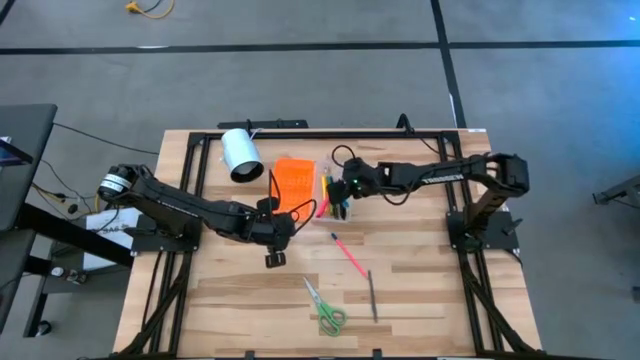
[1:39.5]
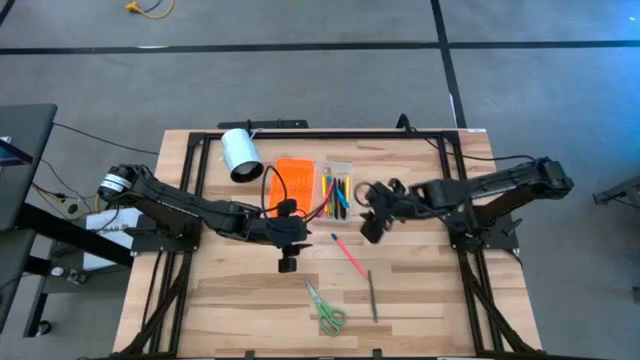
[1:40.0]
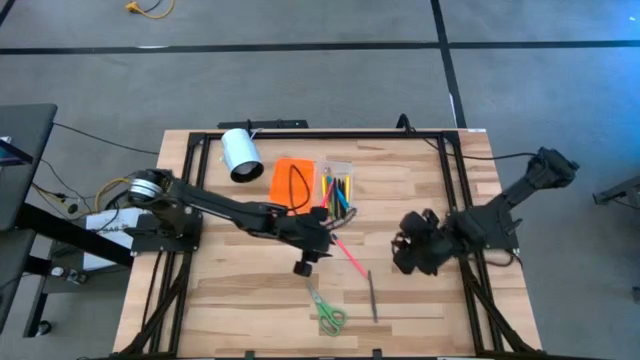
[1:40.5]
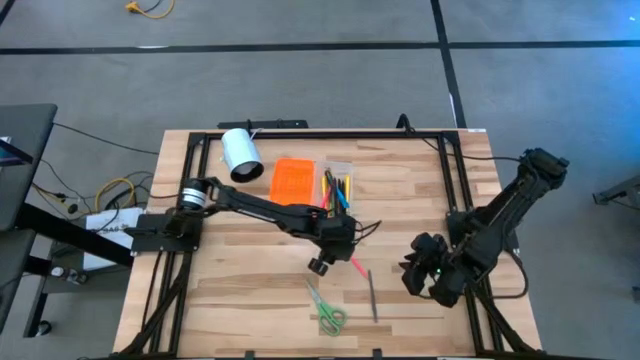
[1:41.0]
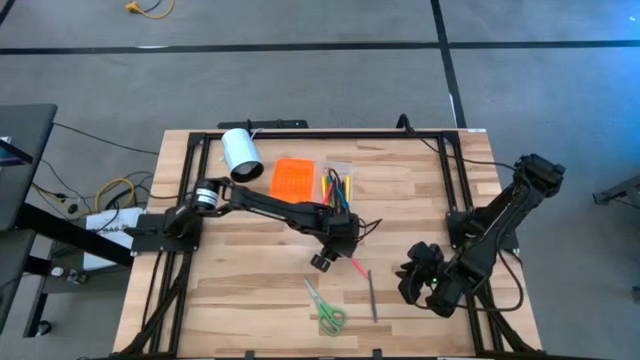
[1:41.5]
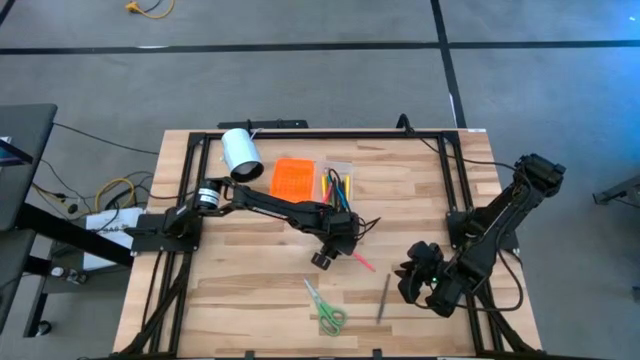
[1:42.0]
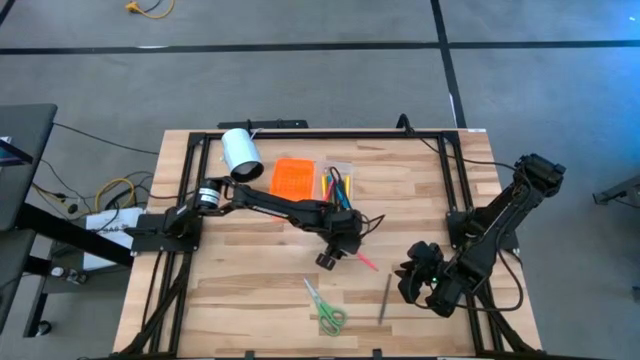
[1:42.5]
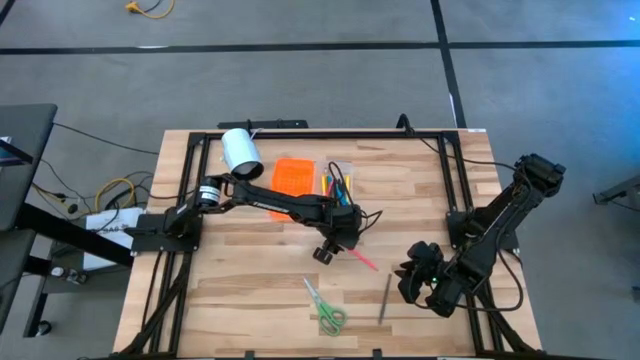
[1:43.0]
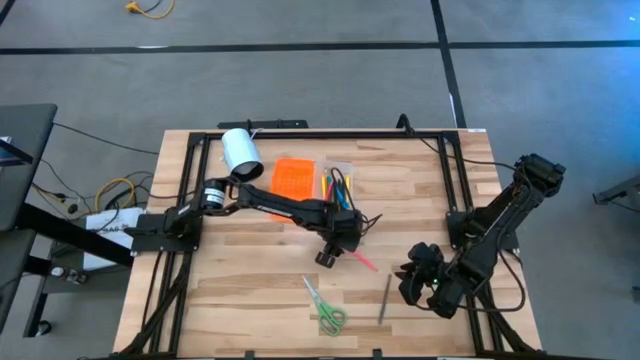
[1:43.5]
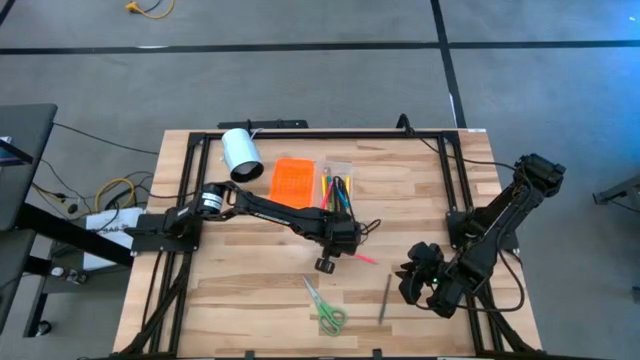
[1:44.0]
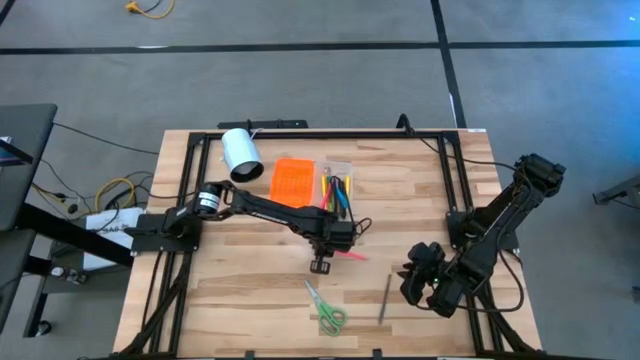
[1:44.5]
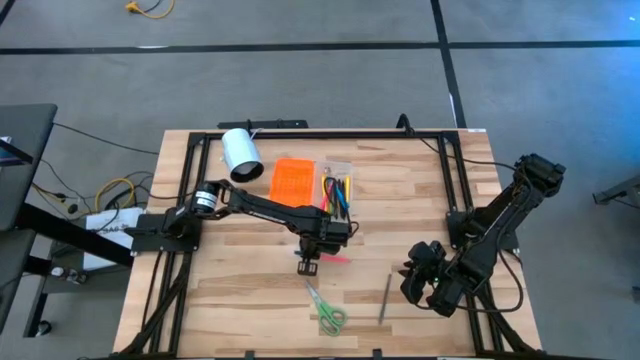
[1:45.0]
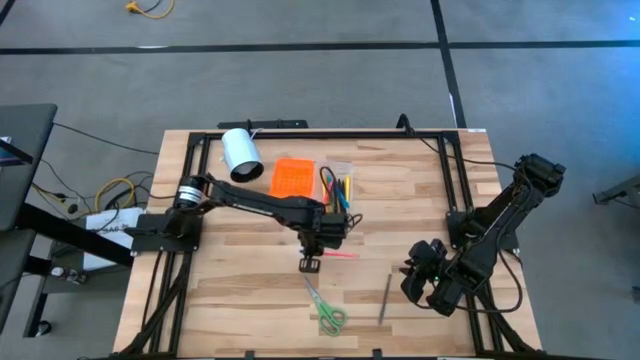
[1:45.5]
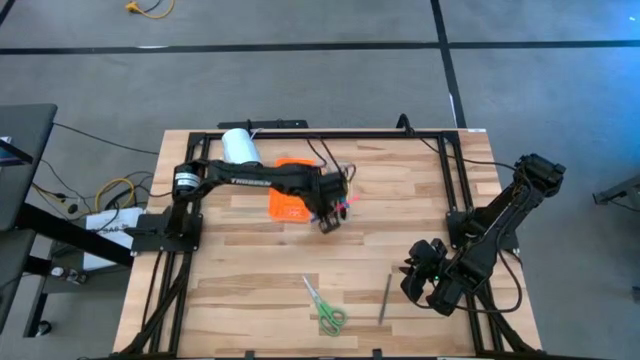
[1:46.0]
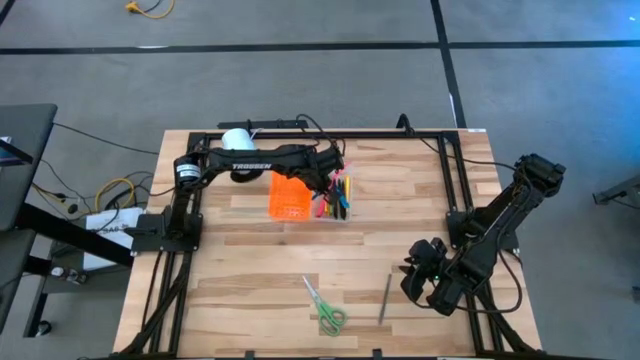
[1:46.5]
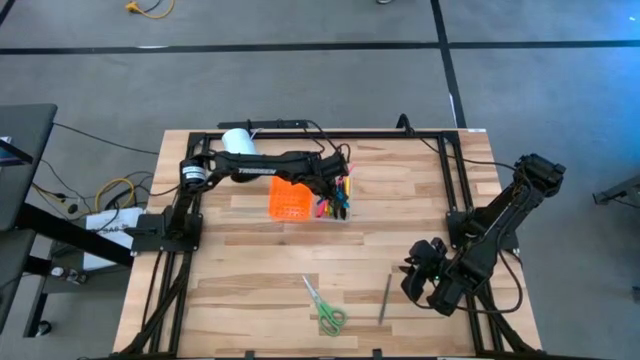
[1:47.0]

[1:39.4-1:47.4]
Task: Pick & place school supplies into a supply box
Put the pink pencil into the orange supply box

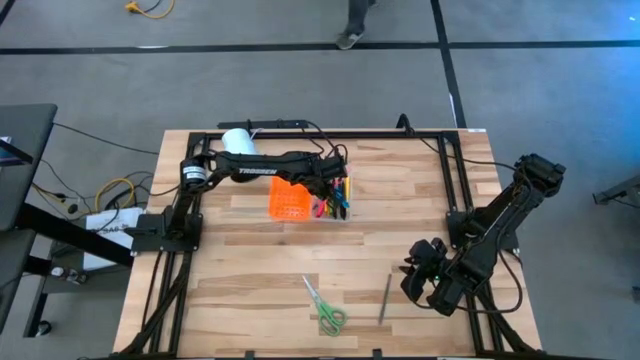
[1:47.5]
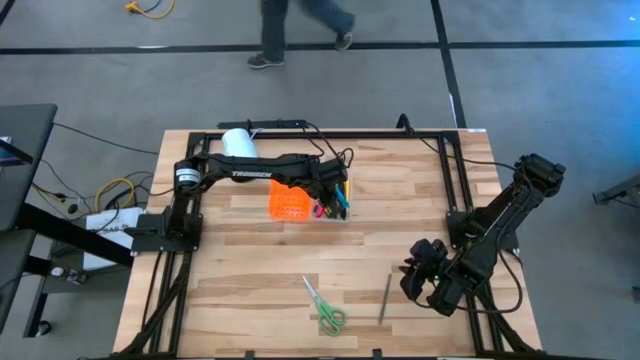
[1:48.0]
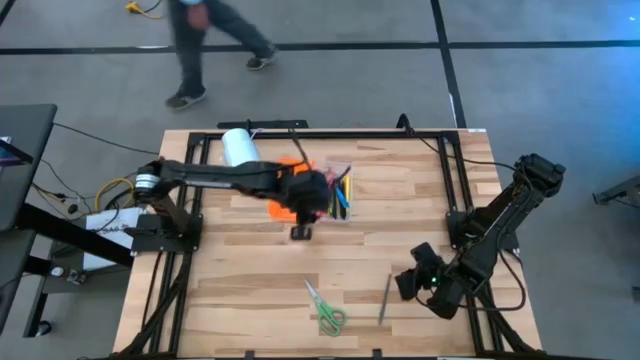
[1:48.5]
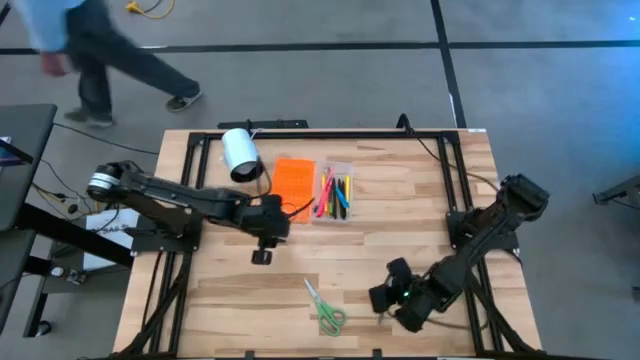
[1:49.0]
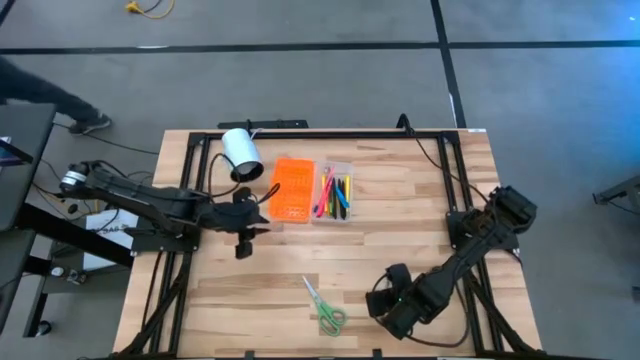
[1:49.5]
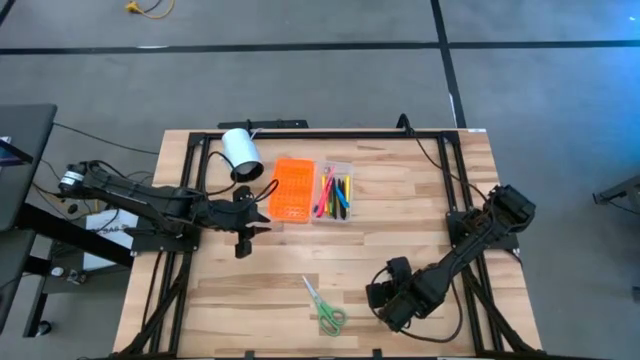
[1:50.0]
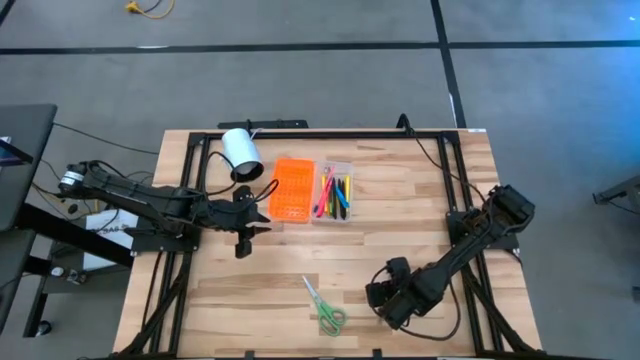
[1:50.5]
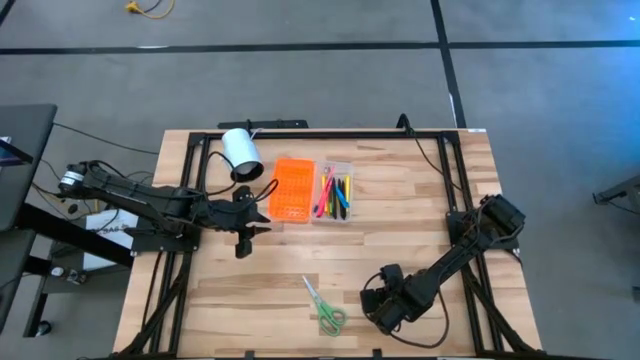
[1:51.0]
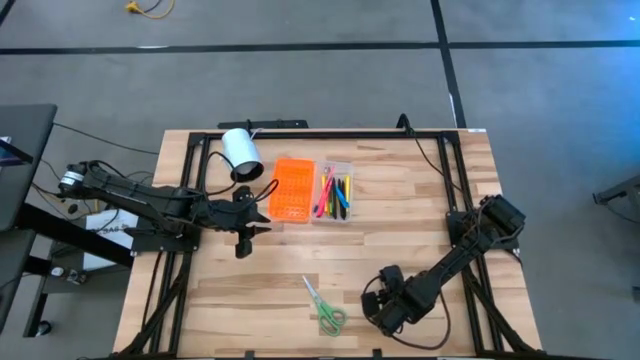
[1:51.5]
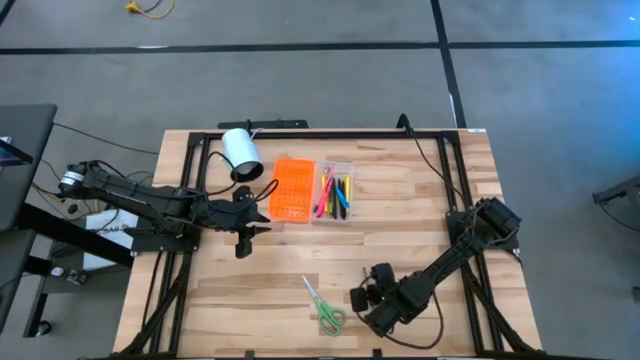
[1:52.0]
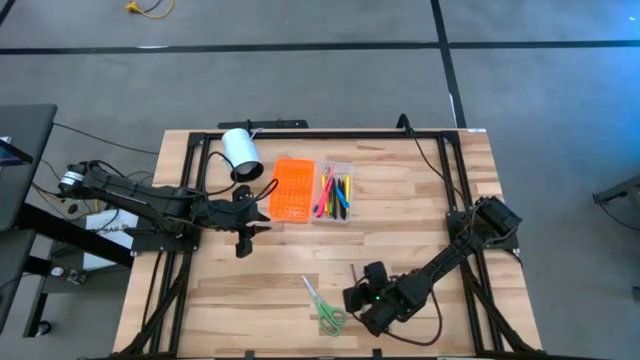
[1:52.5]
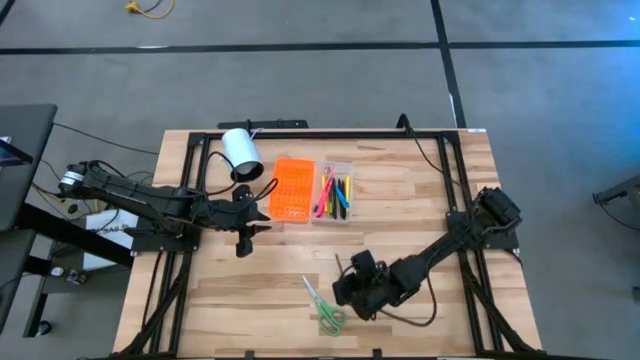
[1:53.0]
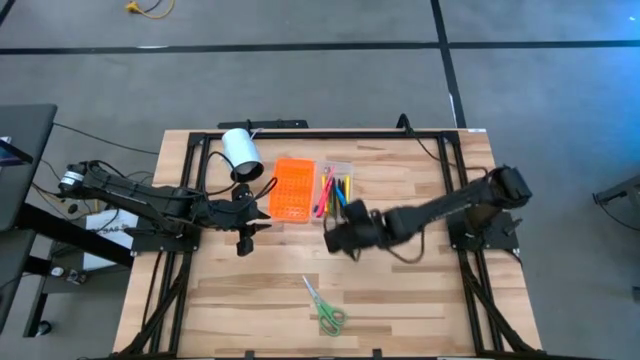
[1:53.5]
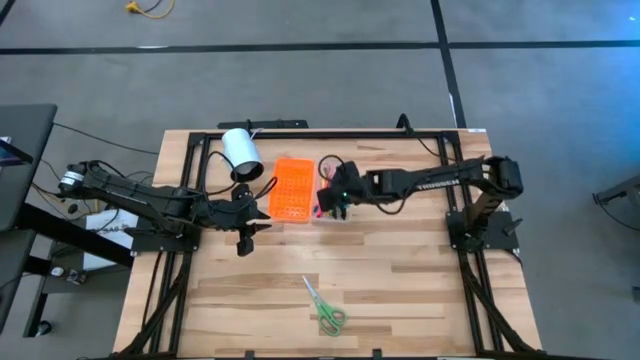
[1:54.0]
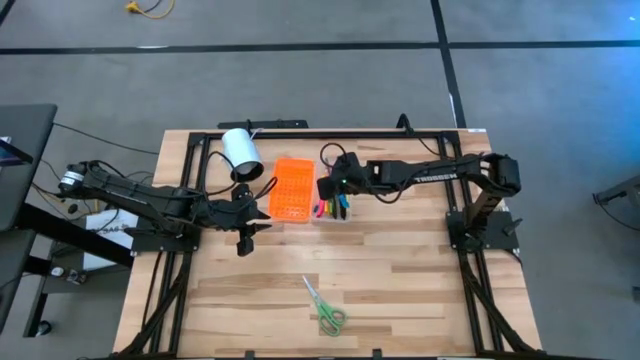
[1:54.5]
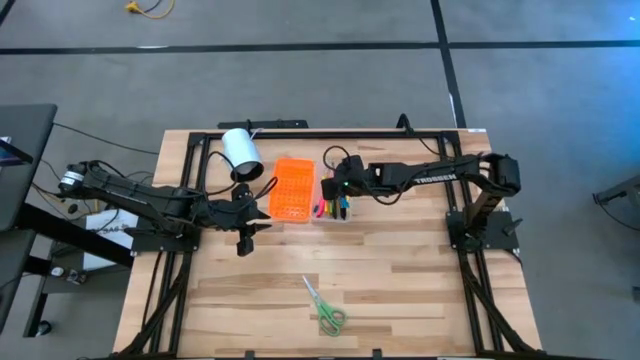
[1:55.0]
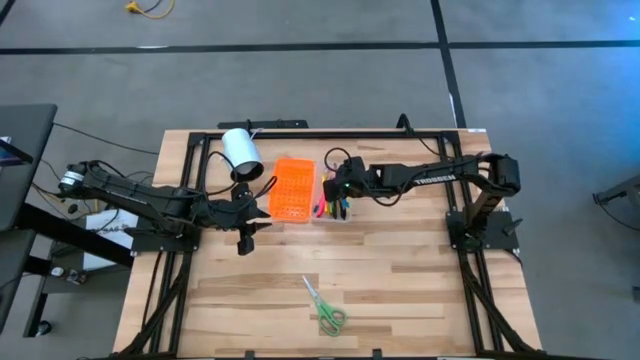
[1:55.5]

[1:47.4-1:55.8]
Put the gray pen into the orange supply box

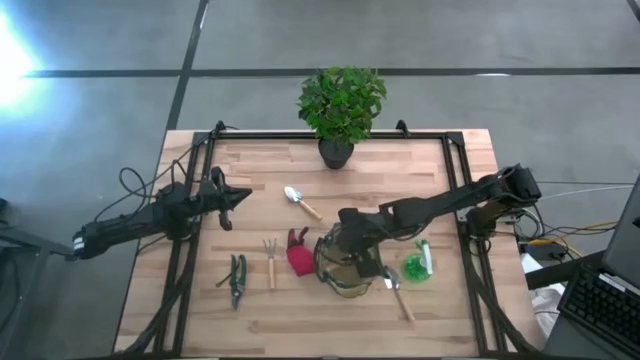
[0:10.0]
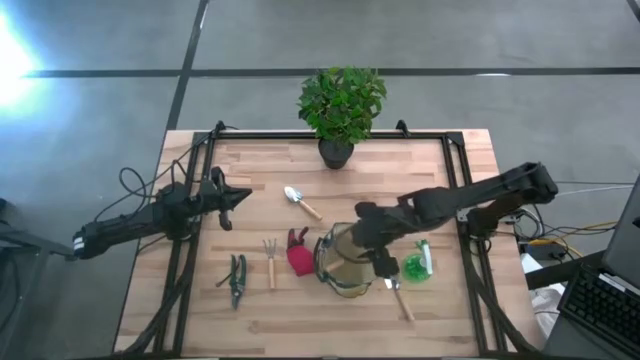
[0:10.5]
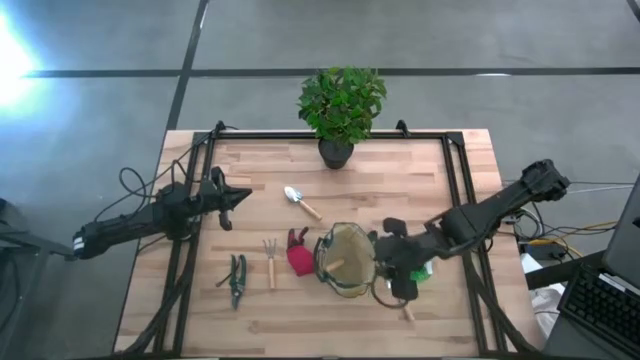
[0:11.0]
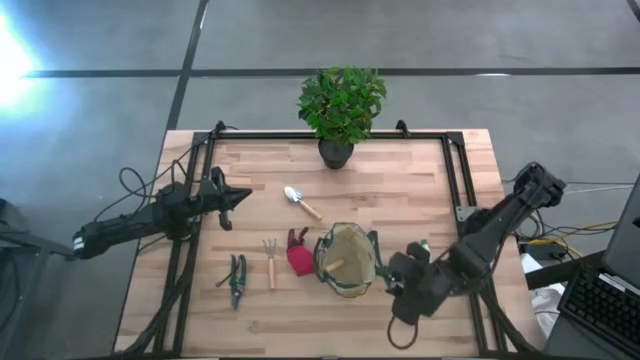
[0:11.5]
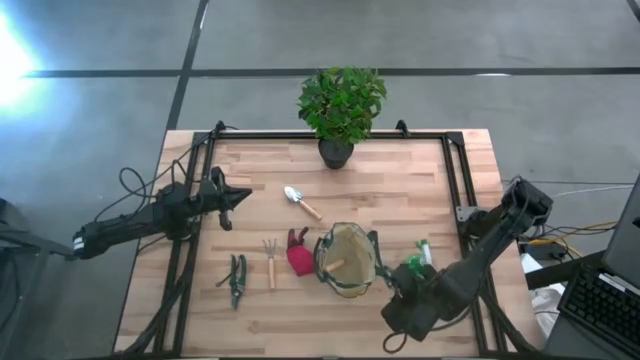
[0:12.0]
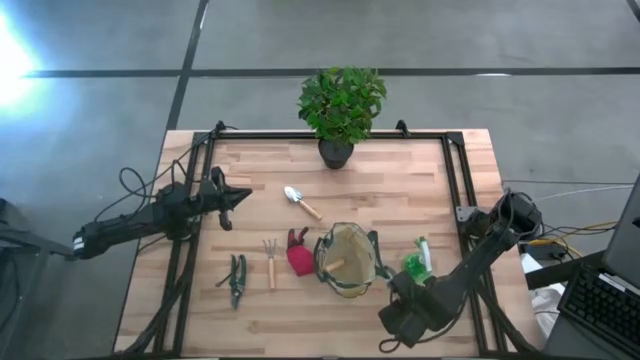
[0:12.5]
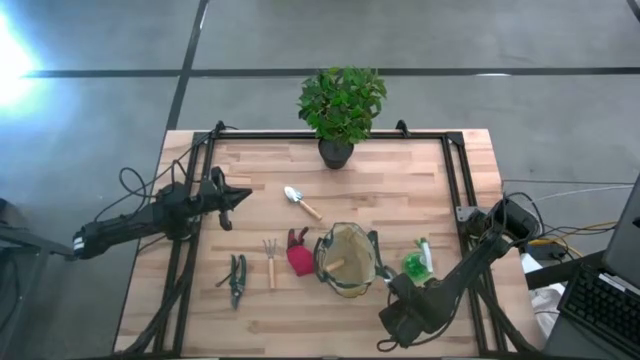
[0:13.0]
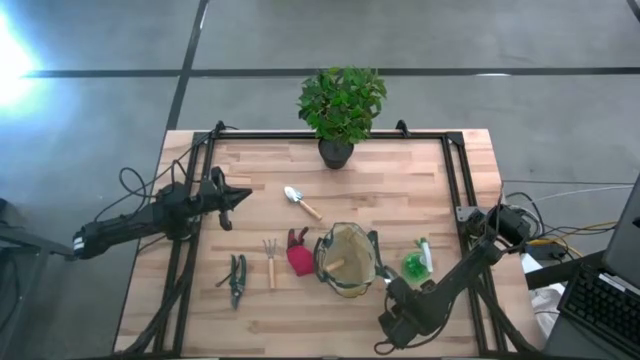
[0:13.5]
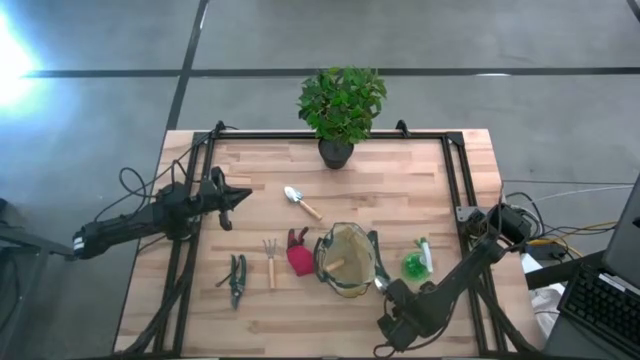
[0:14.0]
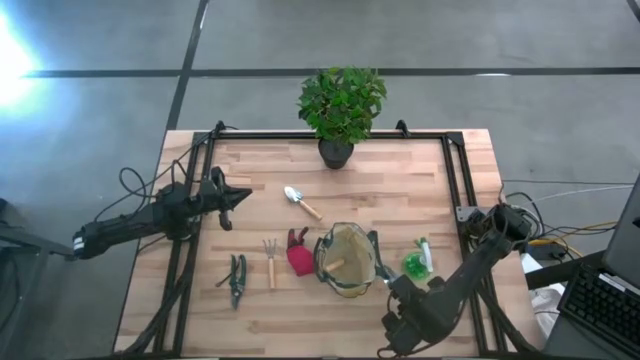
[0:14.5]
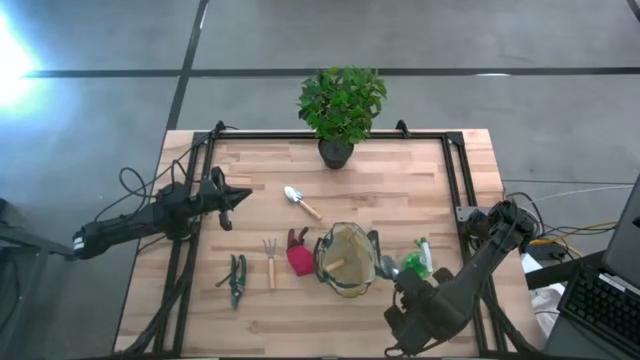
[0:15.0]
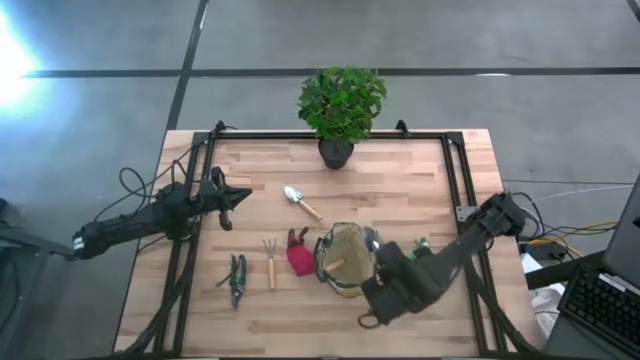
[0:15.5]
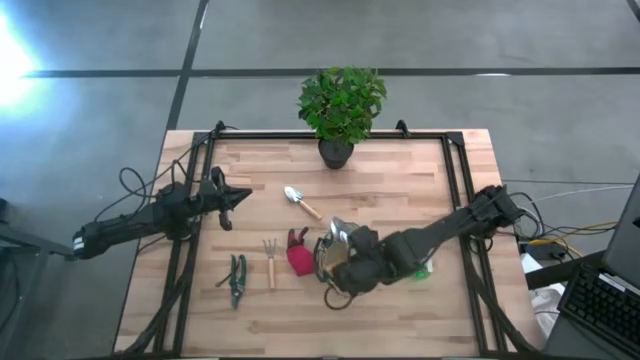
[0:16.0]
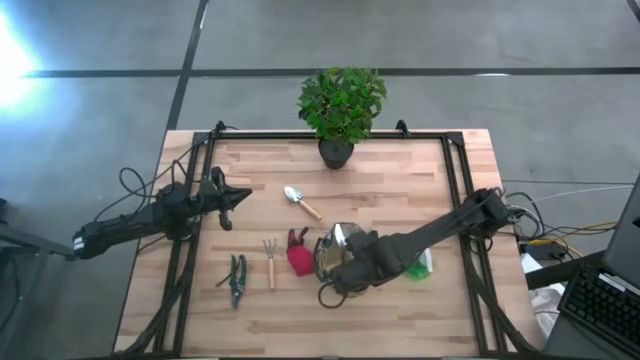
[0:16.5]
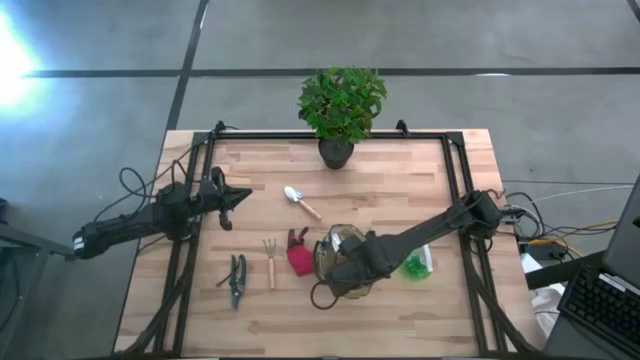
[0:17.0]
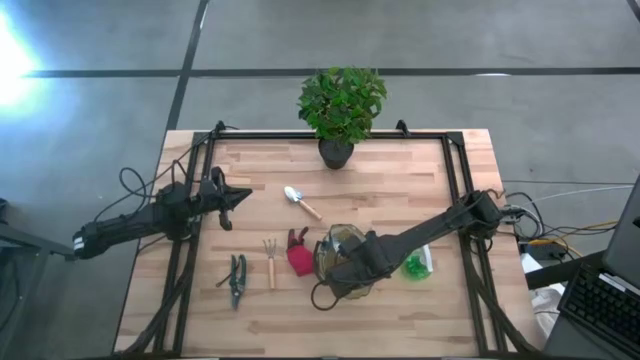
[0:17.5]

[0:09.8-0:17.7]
Task: Pick & Place Garden tools in Gardening bag
Put the bottom brown trowel into the gardening bag
